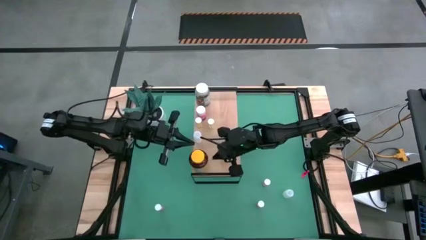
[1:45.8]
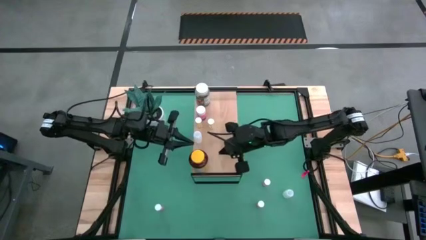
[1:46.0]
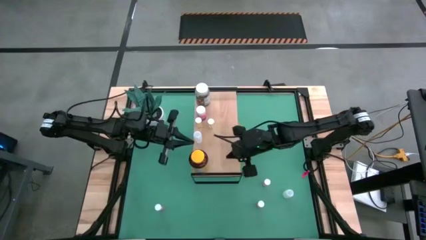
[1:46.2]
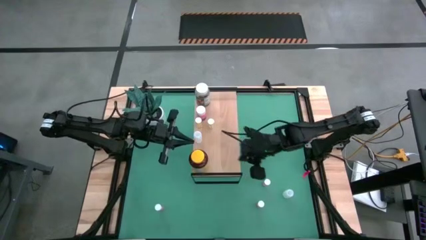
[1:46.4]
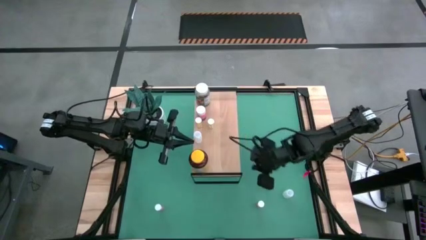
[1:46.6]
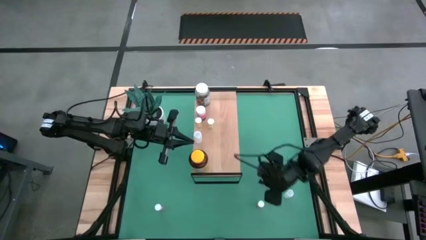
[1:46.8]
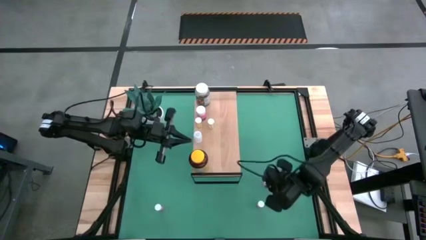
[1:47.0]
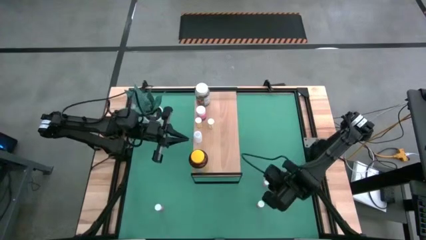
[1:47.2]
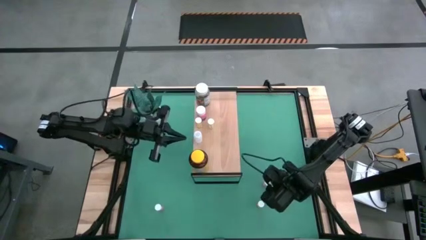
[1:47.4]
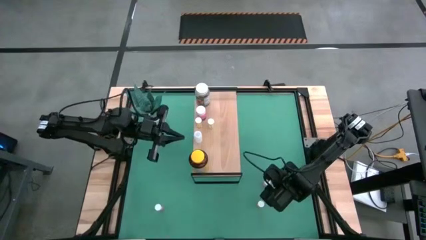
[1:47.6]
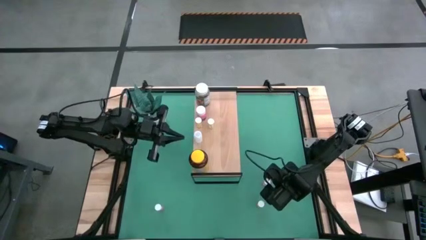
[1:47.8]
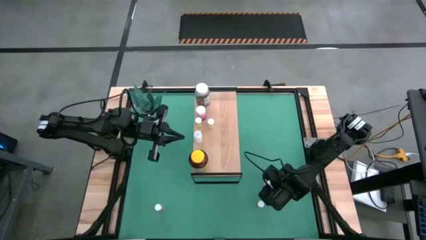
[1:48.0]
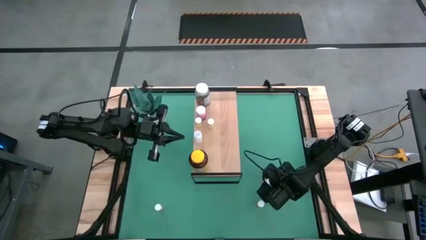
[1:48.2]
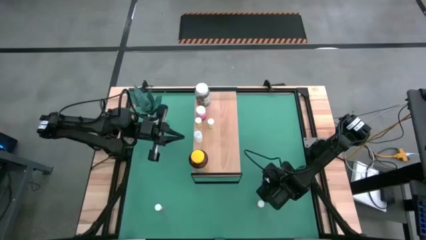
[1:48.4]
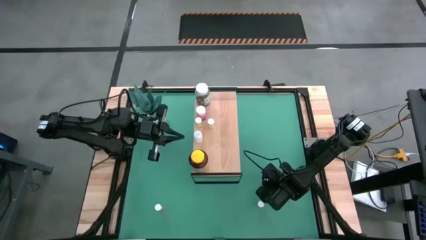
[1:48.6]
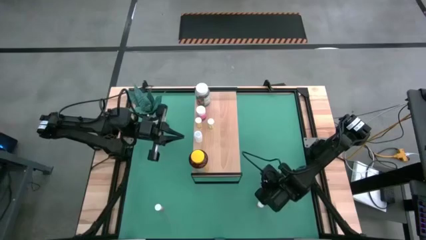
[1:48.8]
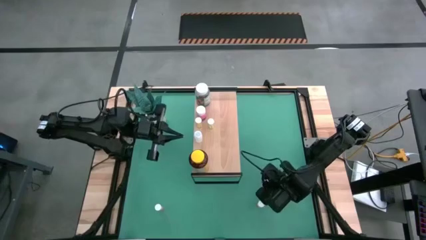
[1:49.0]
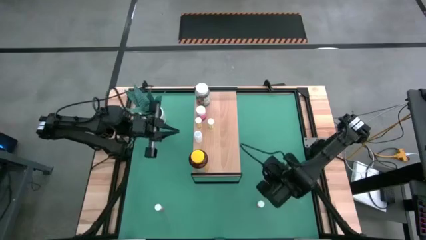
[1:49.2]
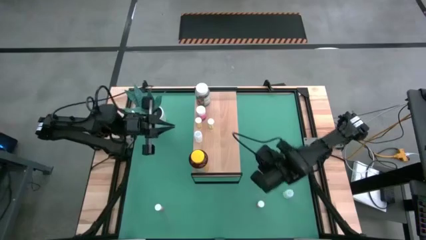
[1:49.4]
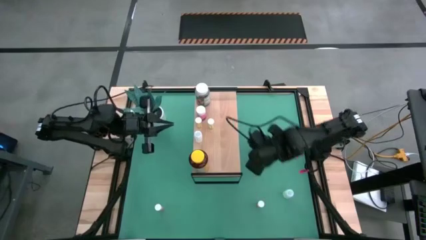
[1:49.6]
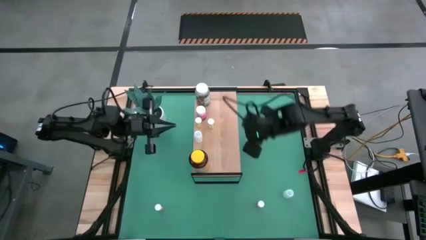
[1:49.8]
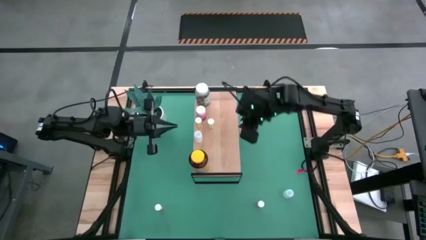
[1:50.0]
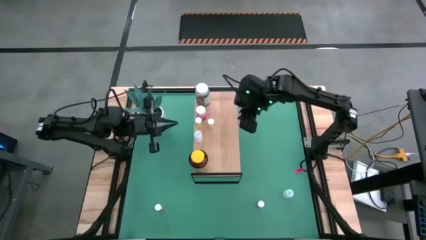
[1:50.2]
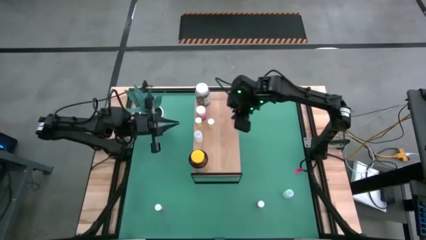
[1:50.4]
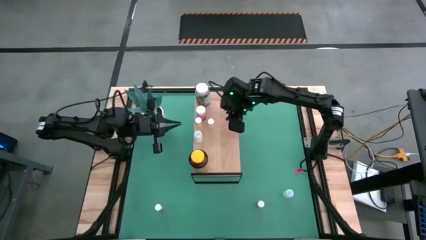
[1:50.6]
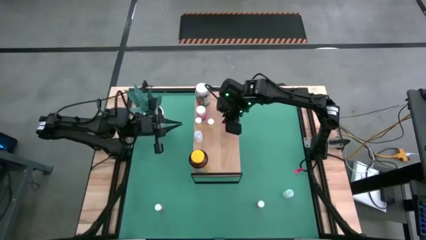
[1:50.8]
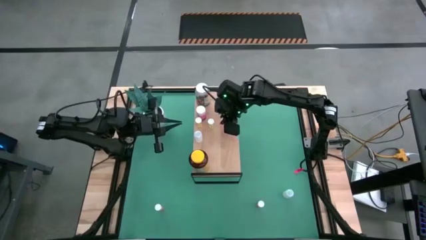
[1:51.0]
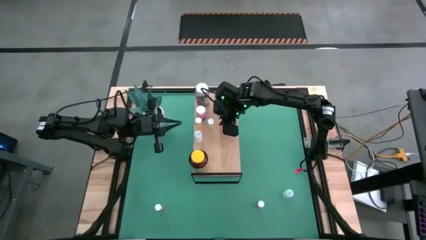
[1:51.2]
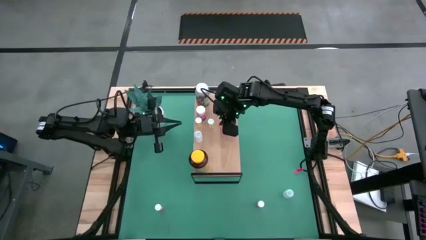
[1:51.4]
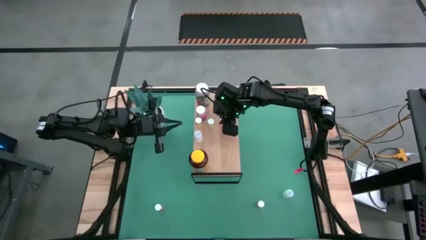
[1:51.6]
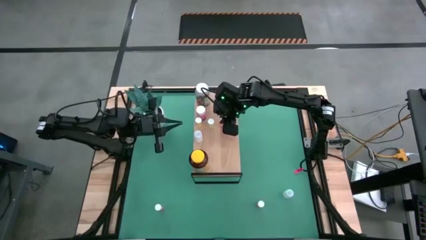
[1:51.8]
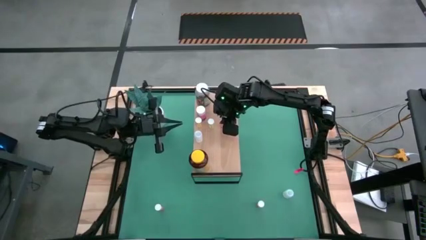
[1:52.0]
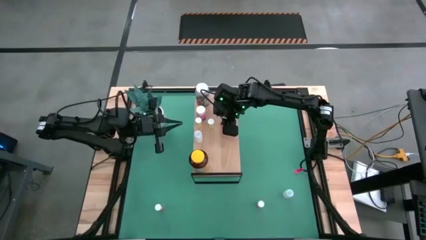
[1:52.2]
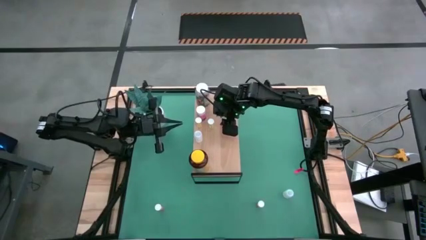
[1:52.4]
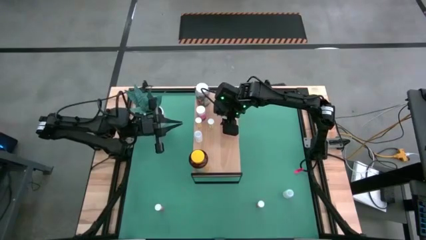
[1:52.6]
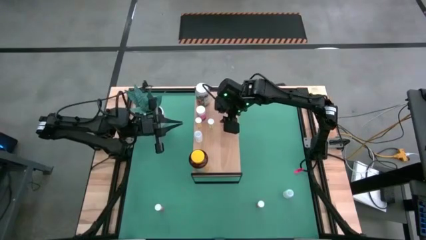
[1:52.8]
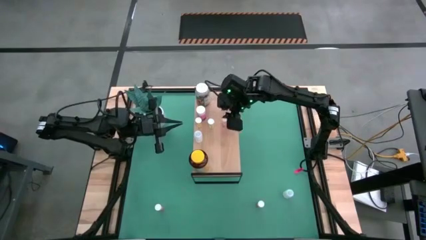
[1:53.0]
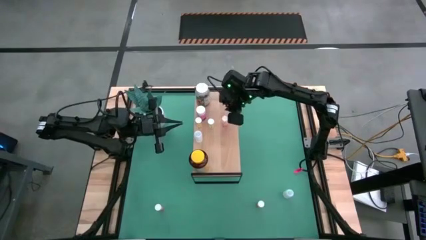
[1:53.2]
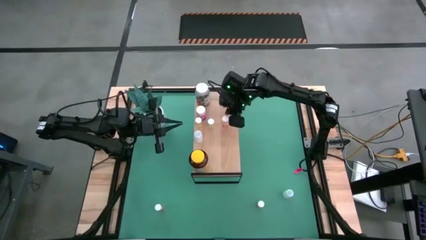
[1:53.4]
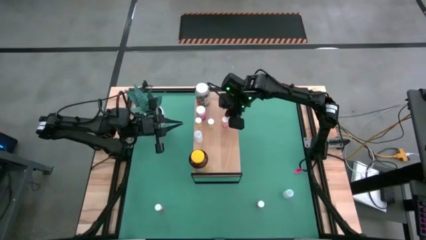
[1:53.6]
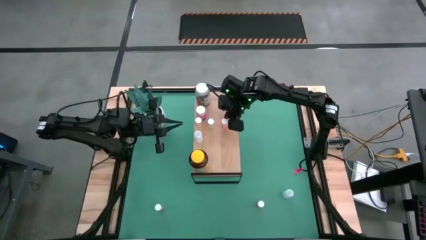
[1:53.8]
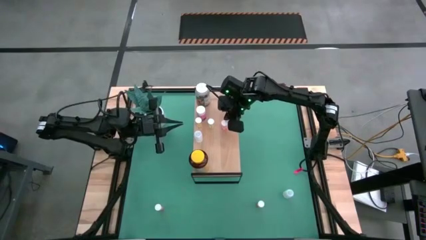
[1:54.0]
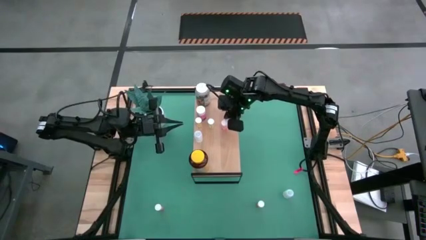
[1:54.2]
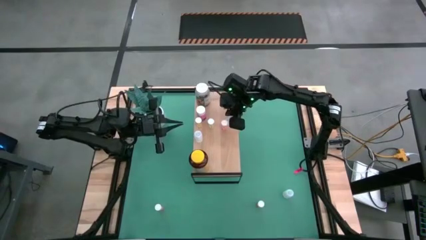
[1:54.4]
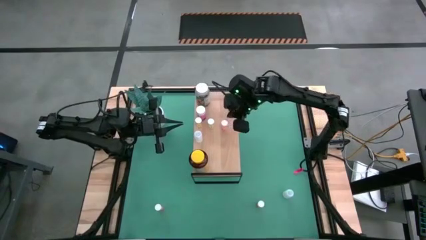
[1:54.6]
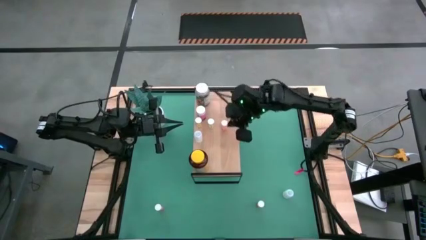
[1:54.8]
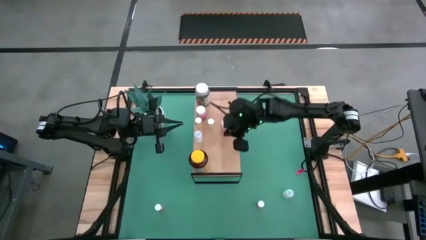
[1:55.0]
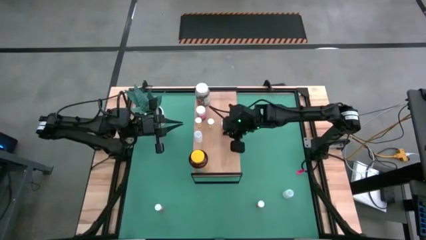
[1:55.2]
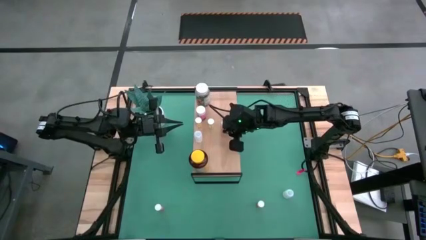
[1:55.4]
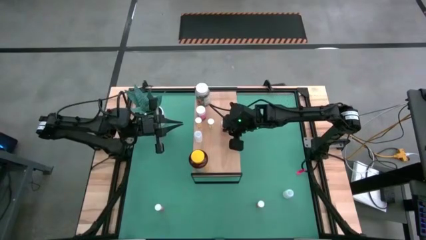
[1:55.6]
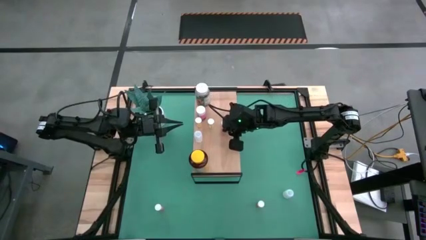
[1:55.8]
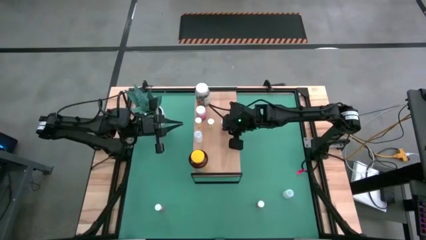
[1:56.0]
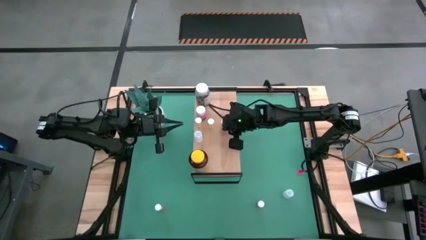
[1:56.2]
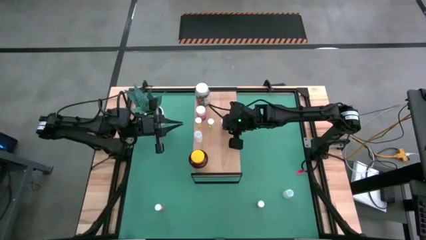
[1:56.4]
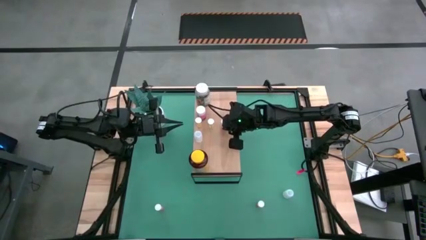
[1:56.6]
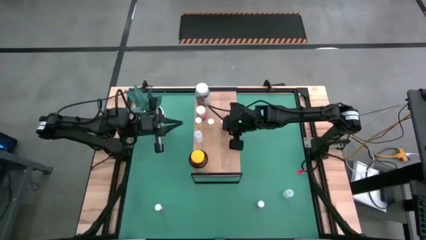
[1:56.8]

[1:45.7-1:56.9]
Task: Pick and place medicine bottles onto shelf by color
Put the orange pill bottle on the shelf

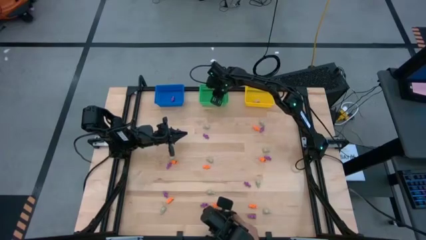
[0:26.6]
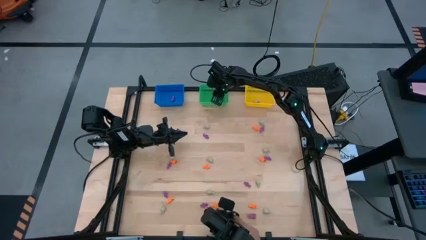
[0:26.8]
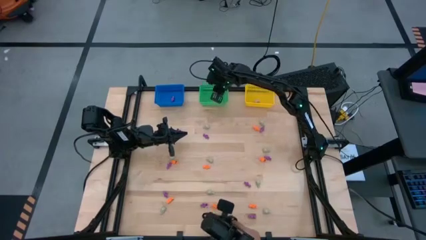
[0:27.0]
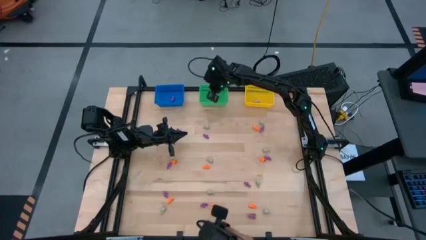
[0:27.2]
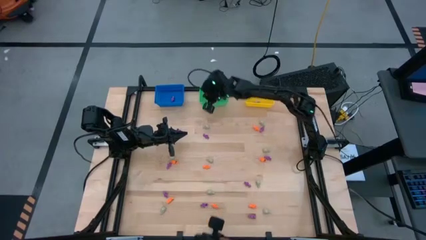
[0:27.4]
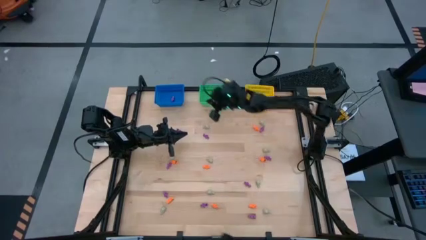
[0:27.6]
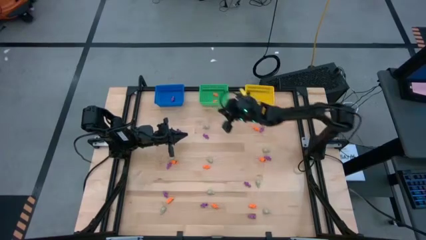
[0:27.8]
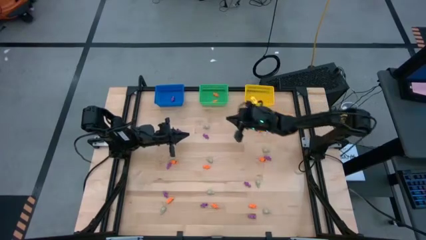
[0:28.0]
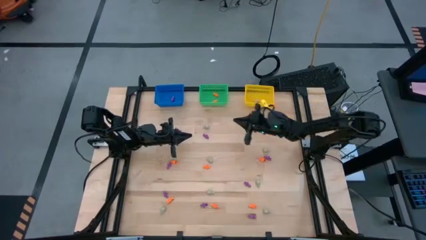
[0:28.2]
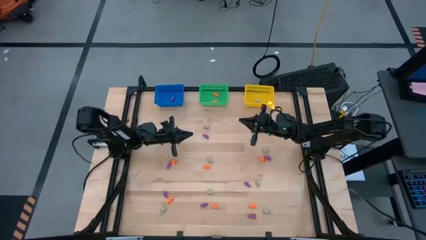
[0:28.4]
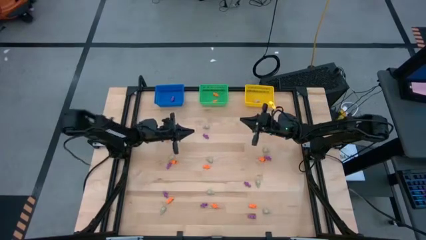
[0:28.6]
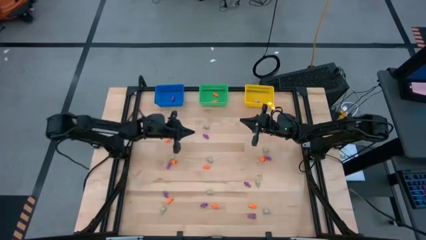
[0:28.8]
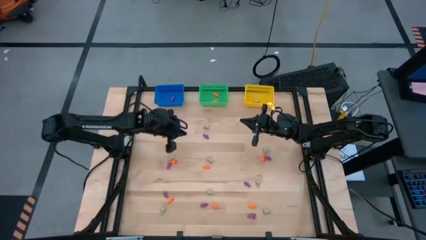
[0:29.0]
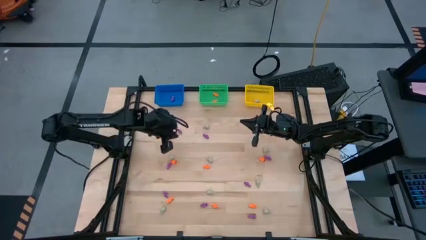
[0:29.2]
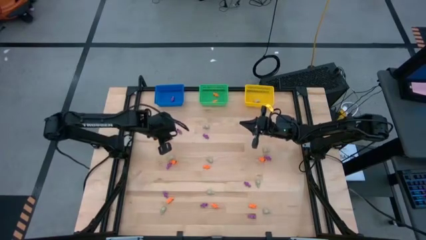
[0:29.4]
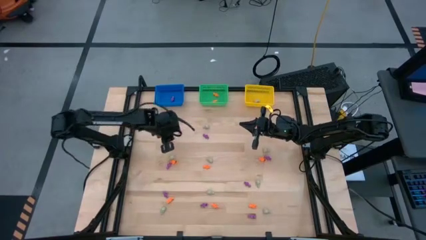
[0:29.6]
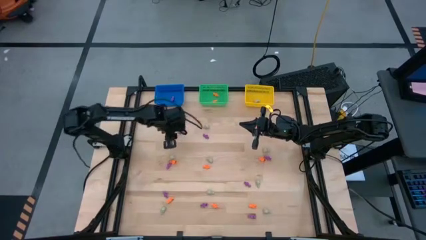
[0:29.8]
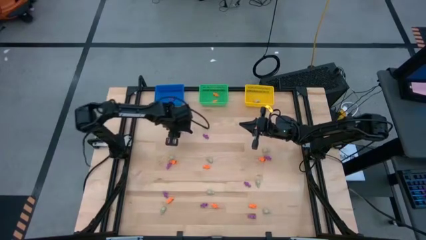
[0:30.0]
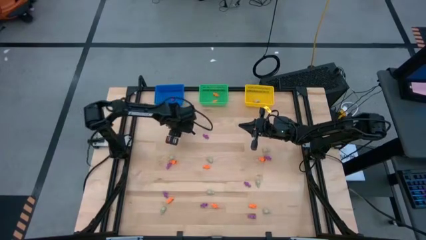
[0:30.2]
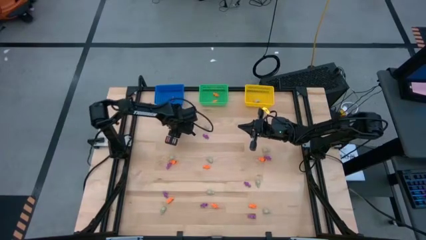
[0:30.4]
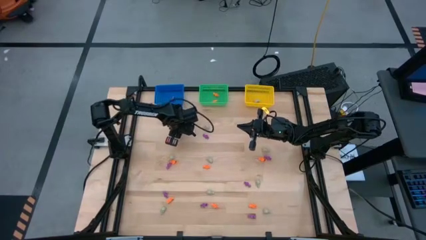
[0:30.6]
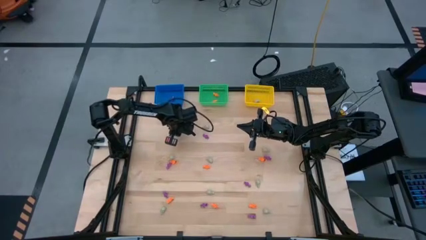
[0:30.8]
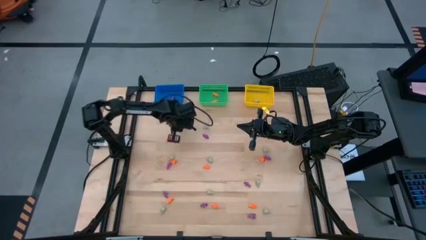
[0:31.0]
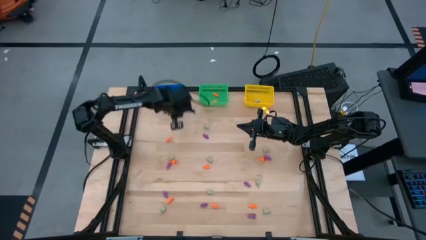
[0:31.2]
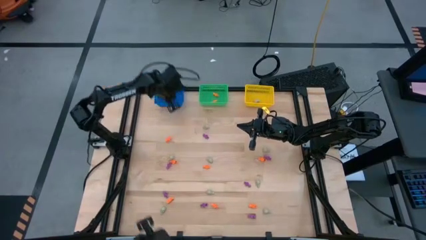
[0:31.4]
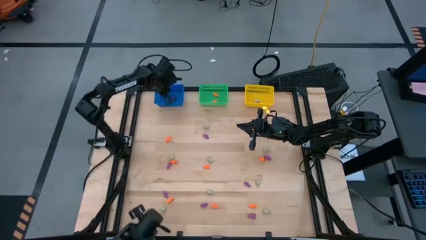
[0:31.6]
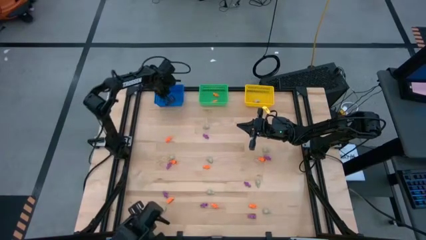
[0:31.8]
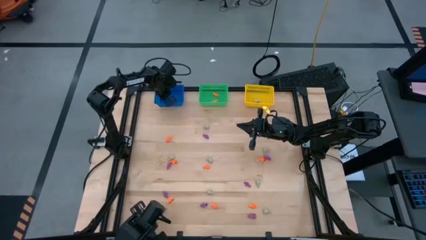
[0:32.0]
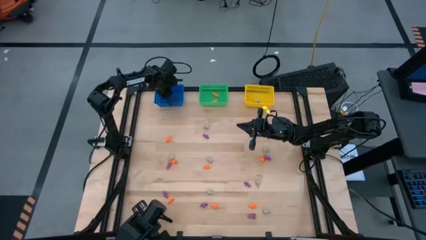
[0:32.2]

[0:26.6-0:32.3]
Task: Sort Halloween decoration
Put the purple skeleton toy into the blue basket
